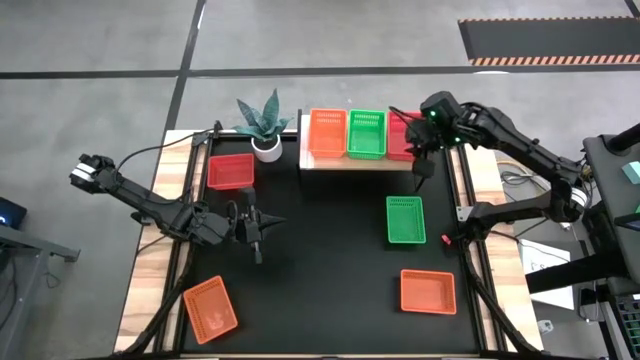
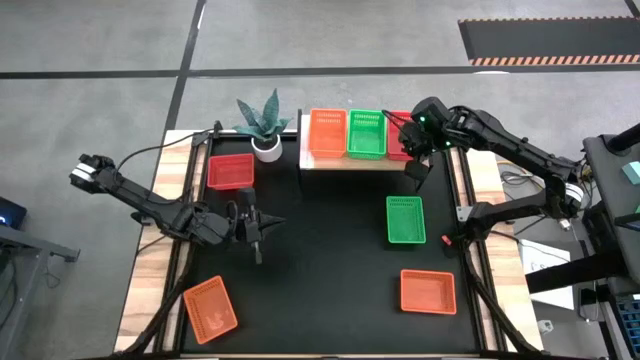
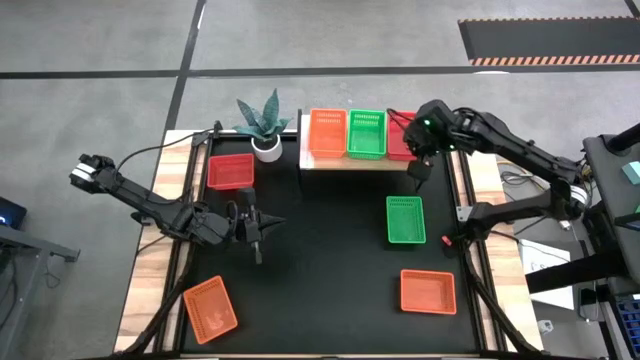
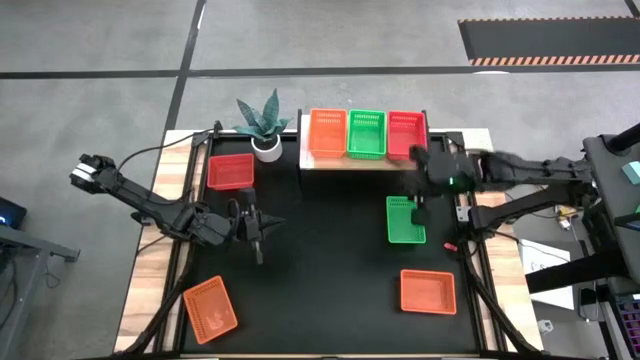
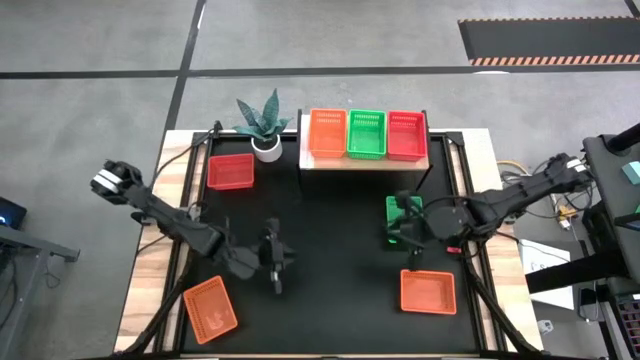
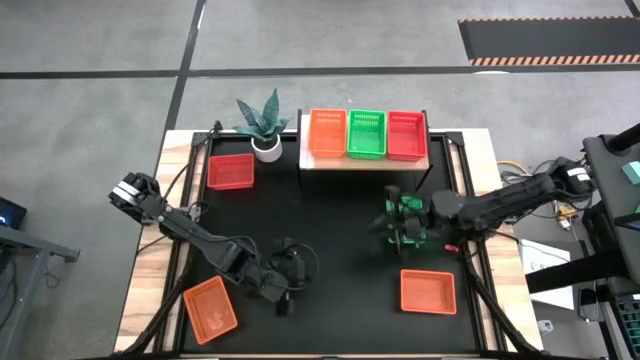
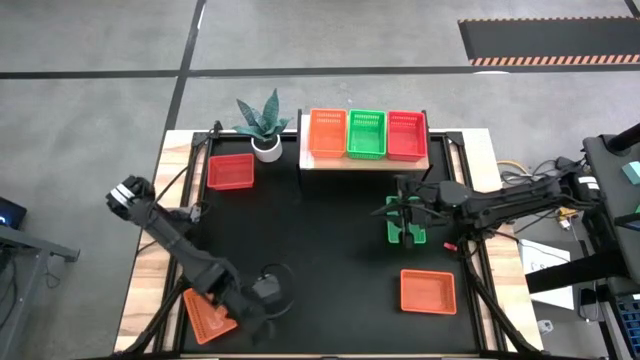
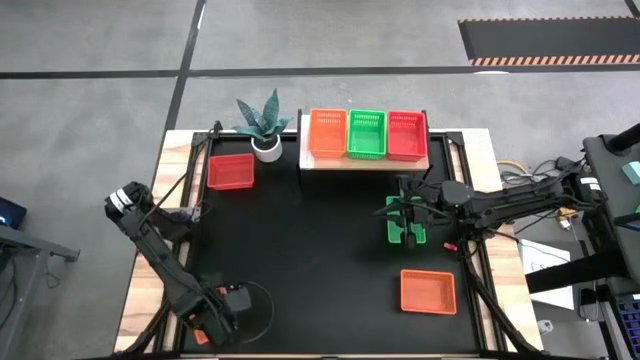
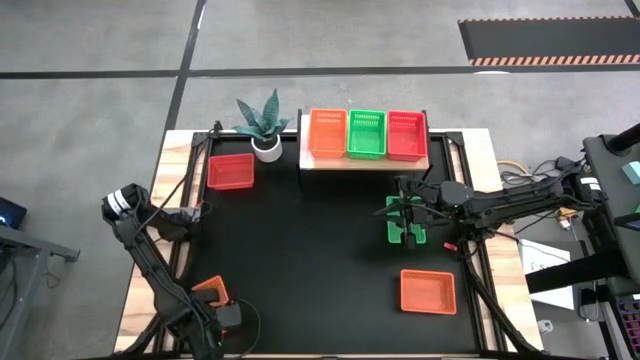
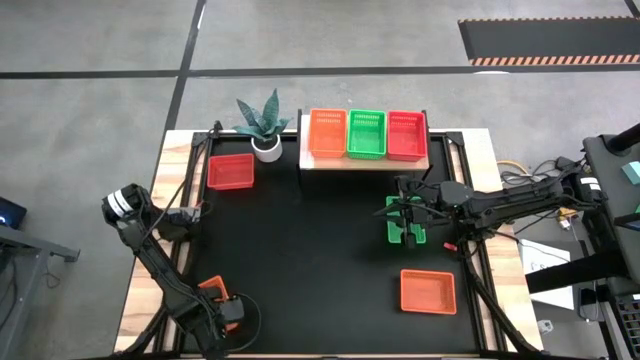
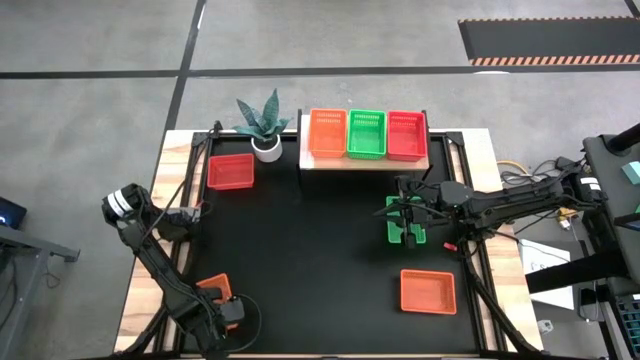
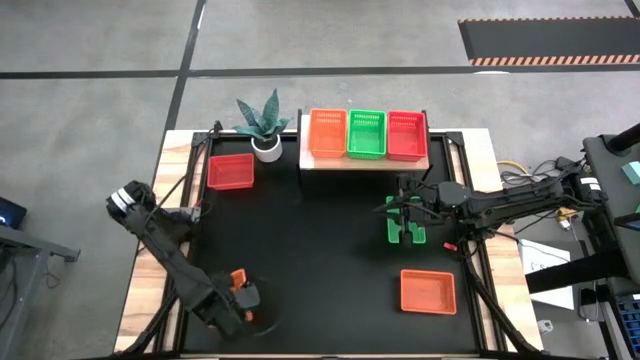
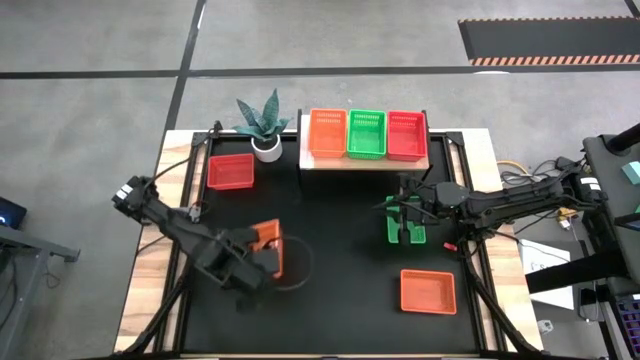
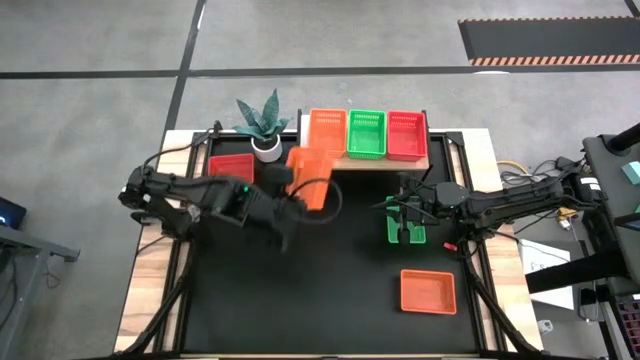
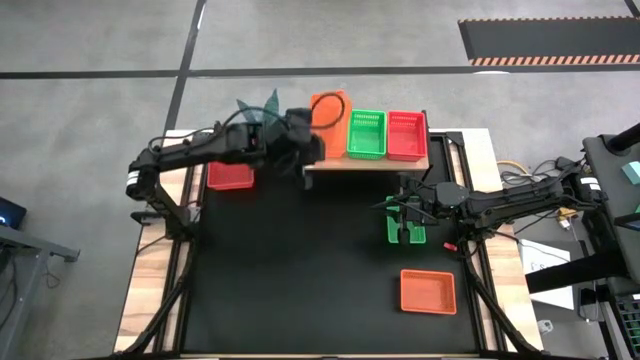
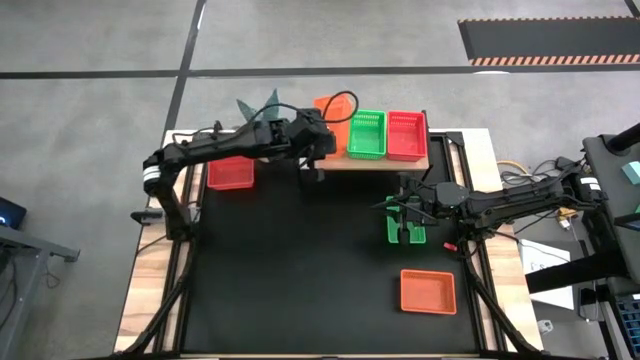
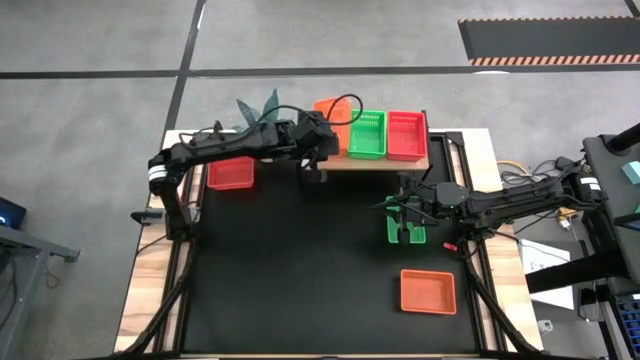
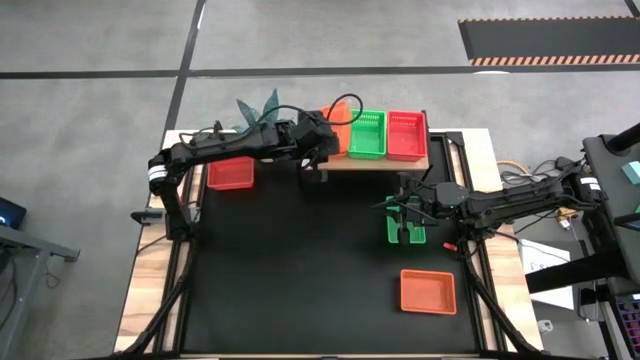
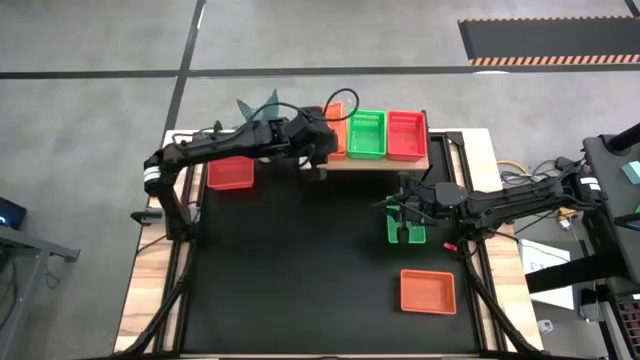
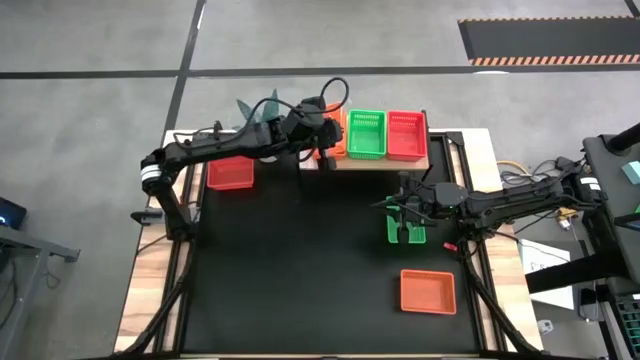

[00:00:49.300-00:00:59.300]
Task: Stack baskets on shelf by color
Stack the left orange bin on top of the orange bin on the shelf

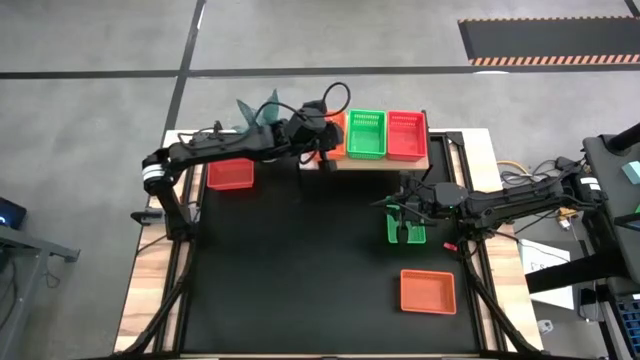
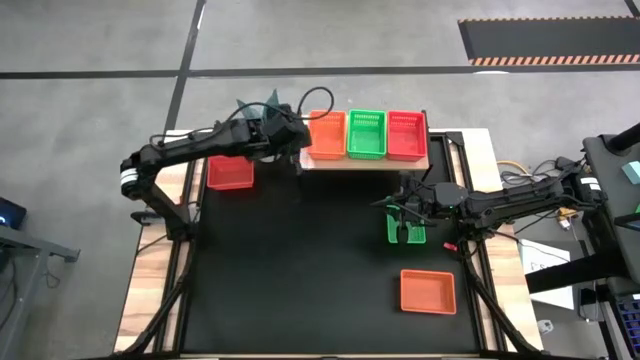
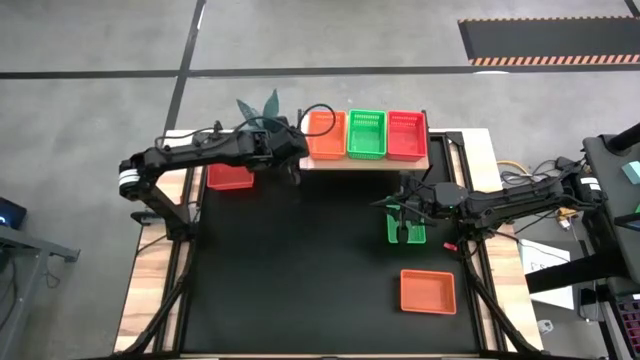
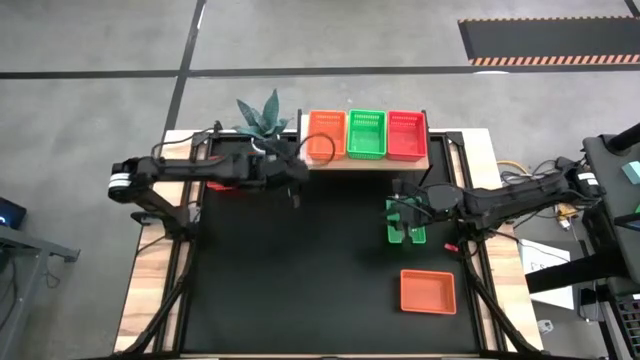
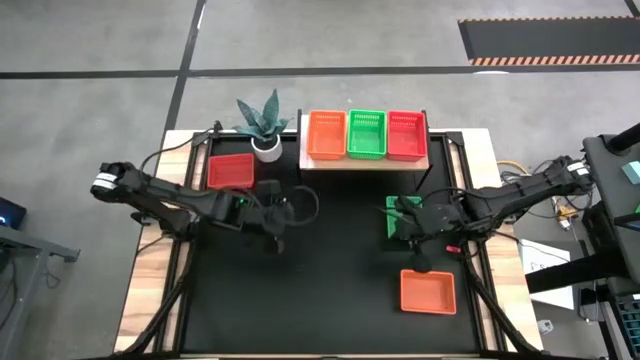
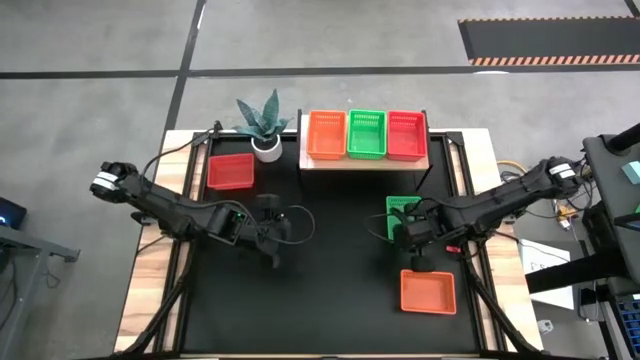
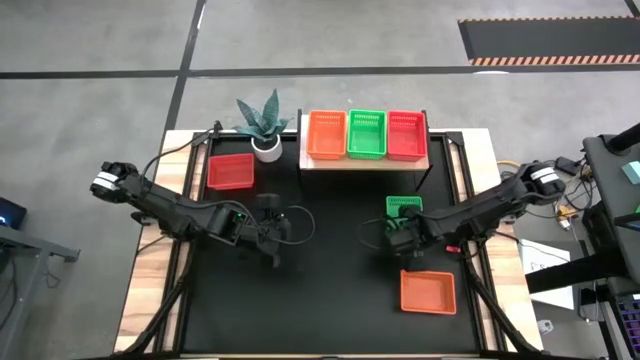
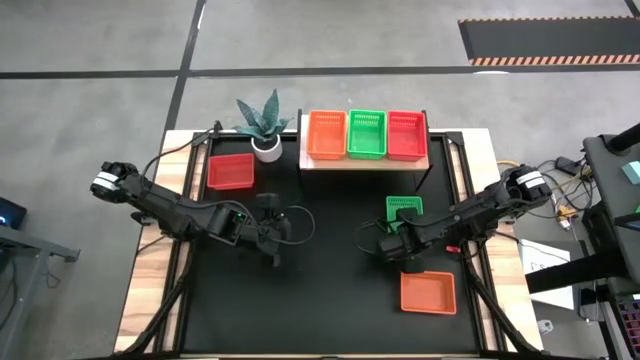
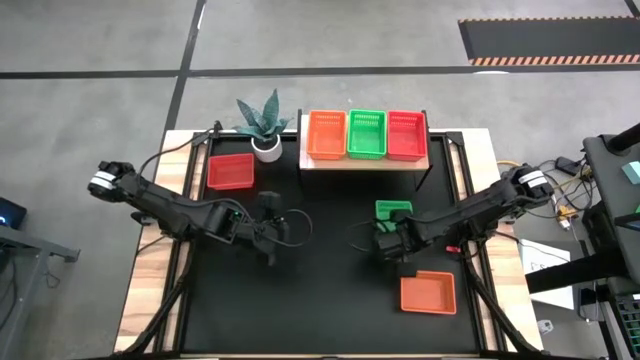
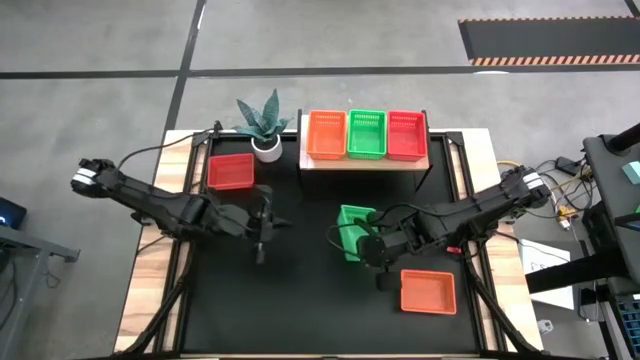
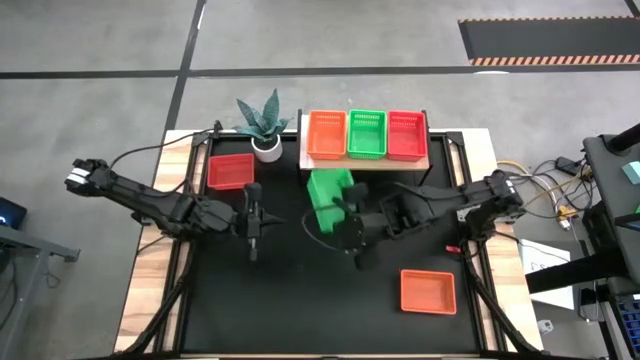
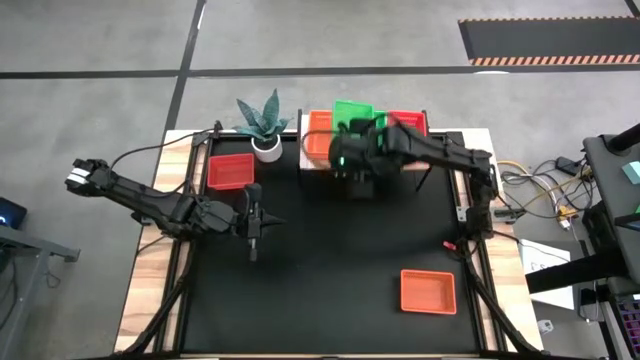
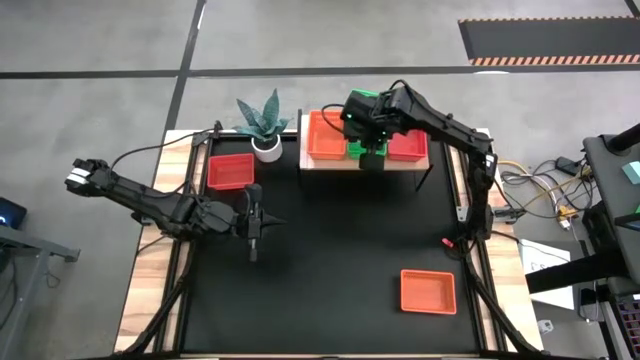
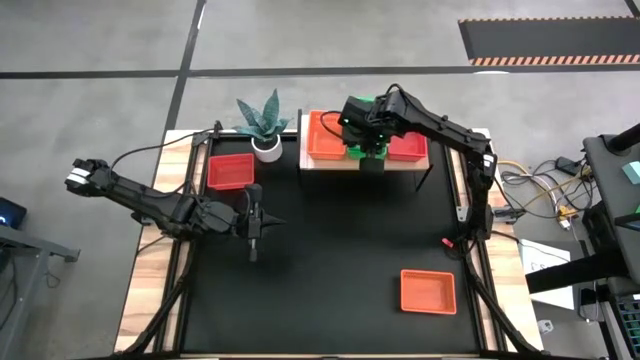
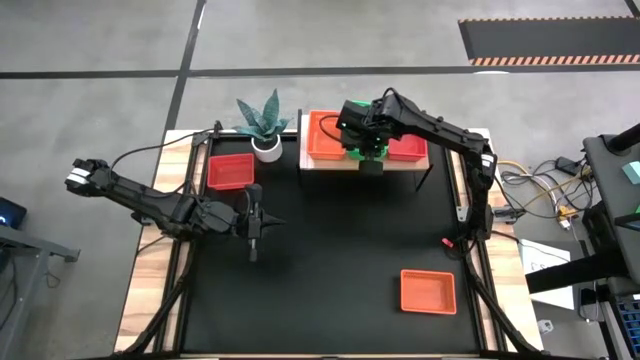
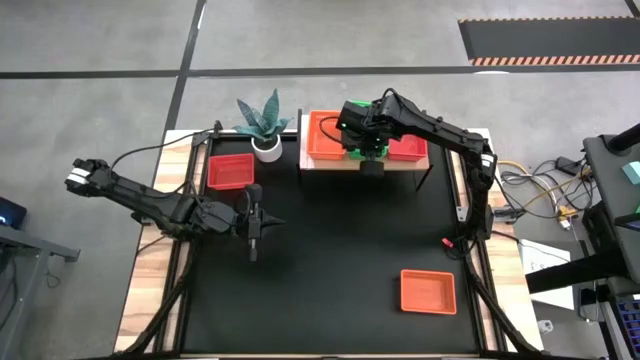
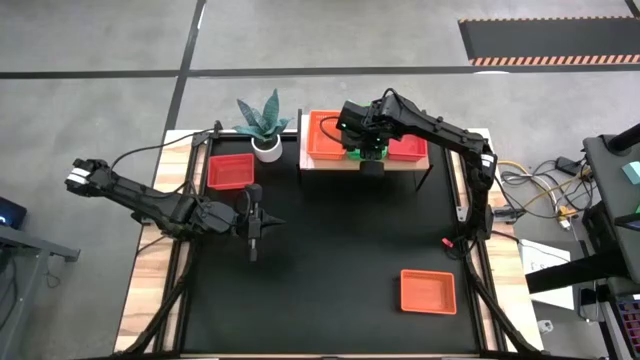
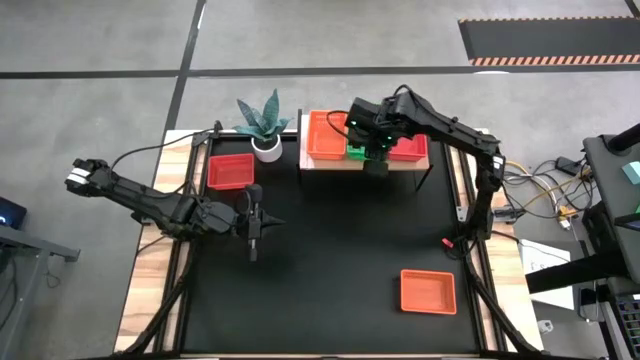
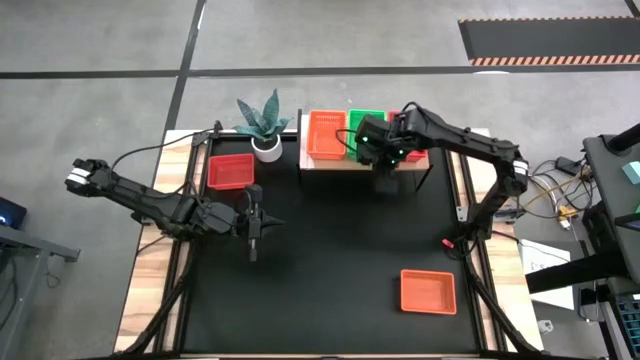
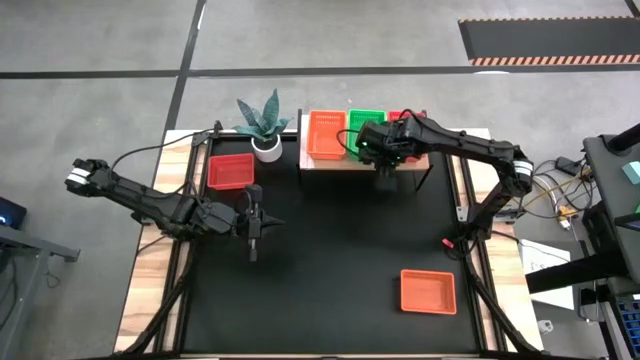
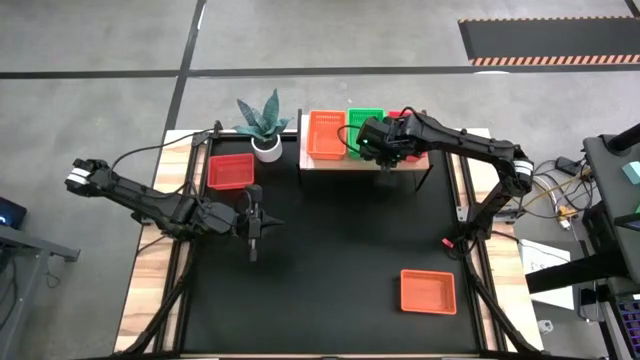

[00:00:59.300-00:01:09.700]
Stack the green bin on top of the green bins on the shelf

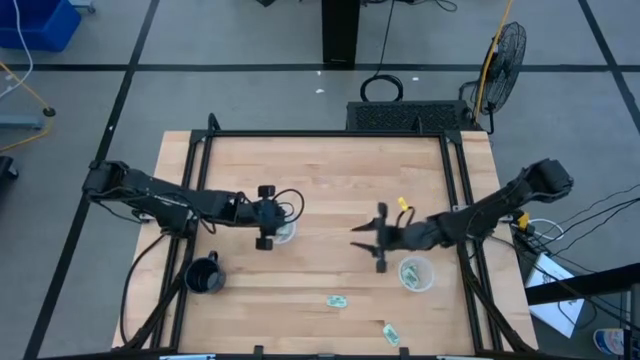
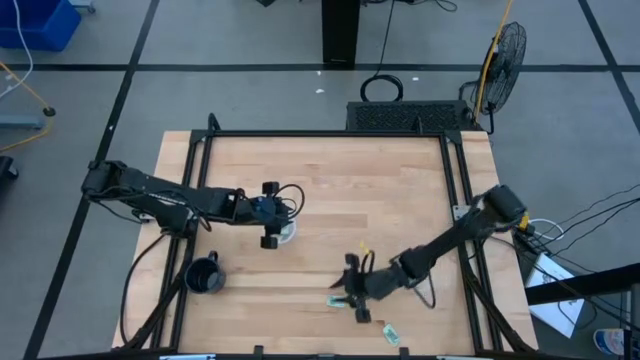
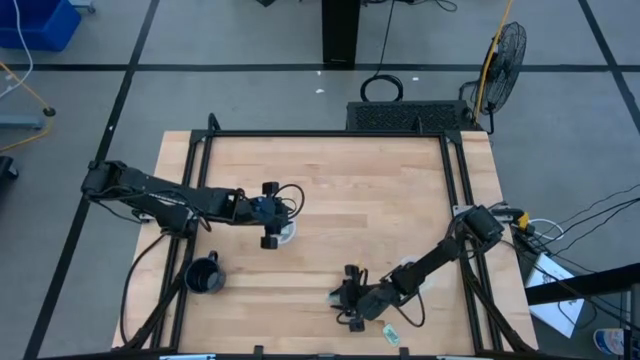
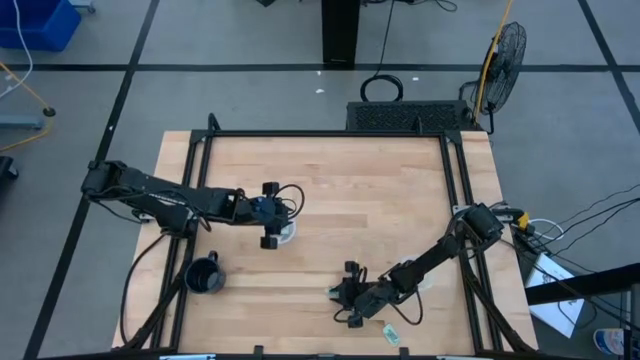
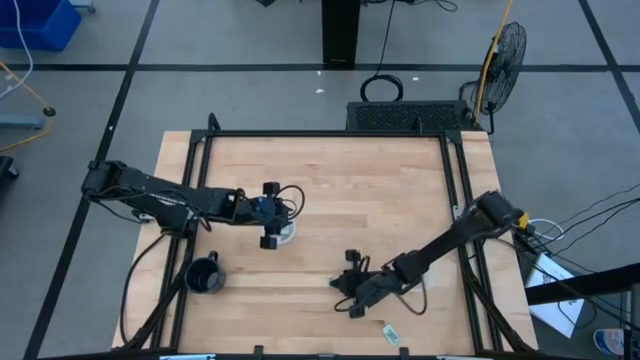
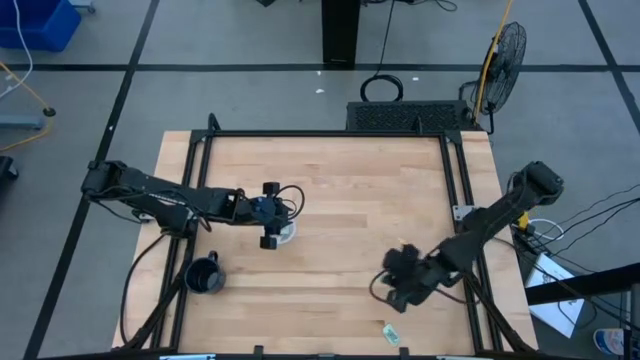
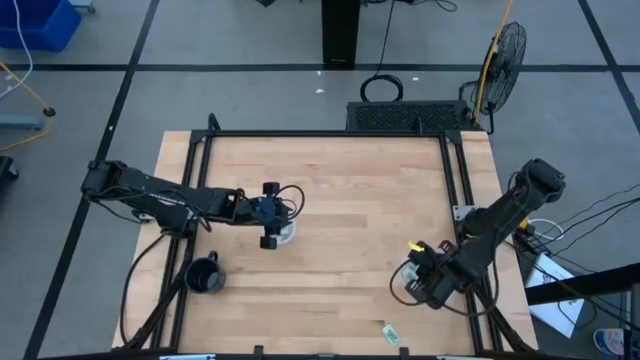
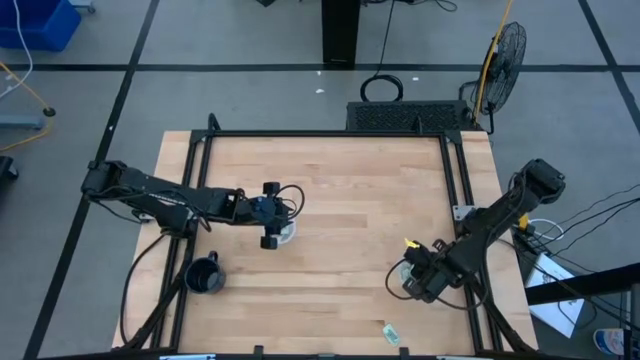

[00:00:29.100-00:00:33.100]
Task: Pick and place Stevia / Truvia into bins
Put the green stevia packet into the right transparent container
